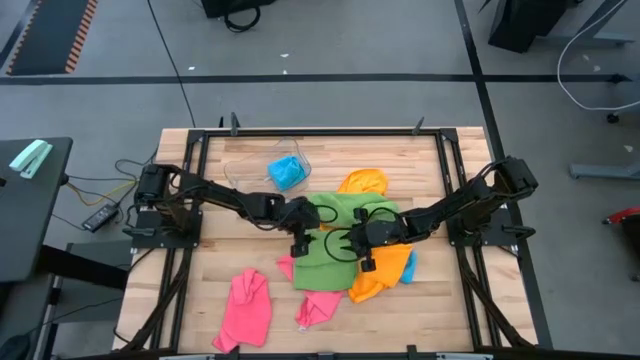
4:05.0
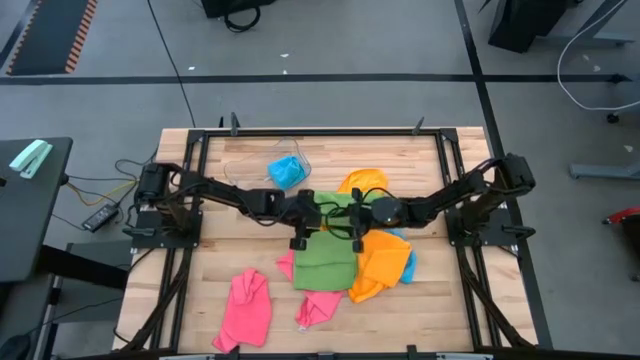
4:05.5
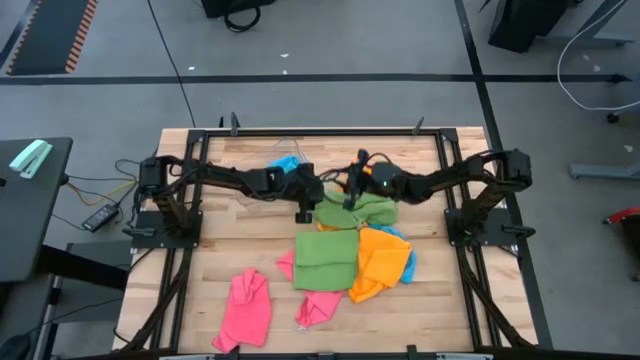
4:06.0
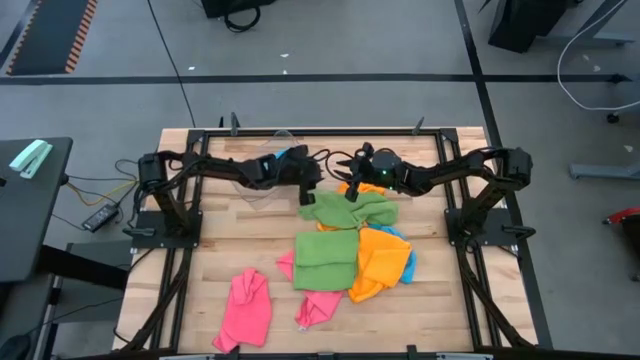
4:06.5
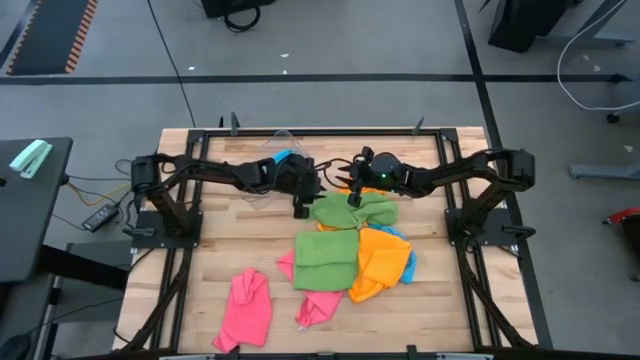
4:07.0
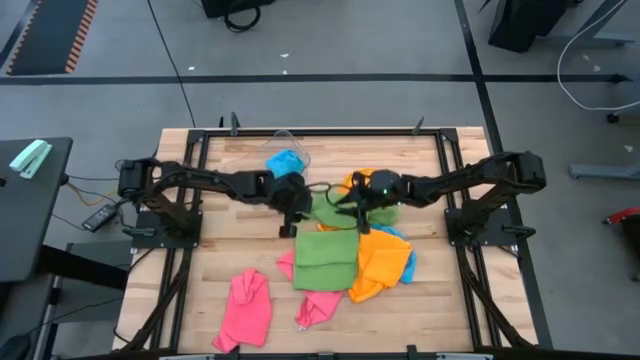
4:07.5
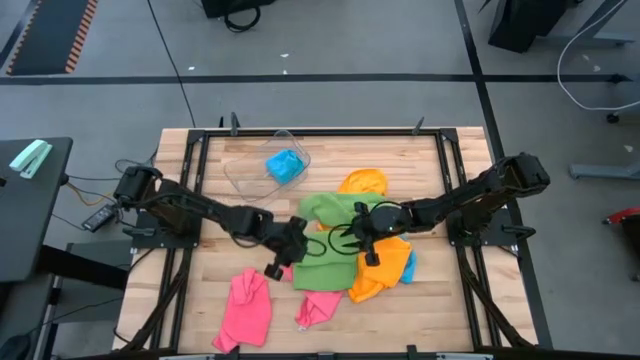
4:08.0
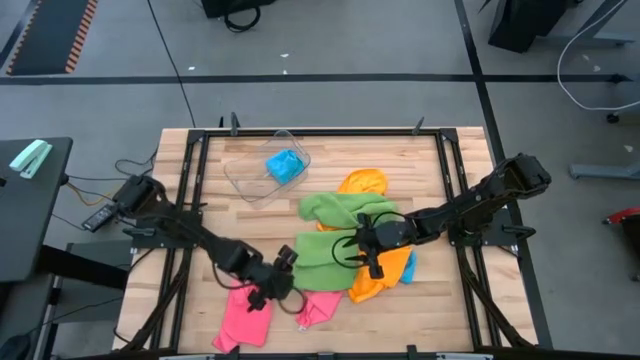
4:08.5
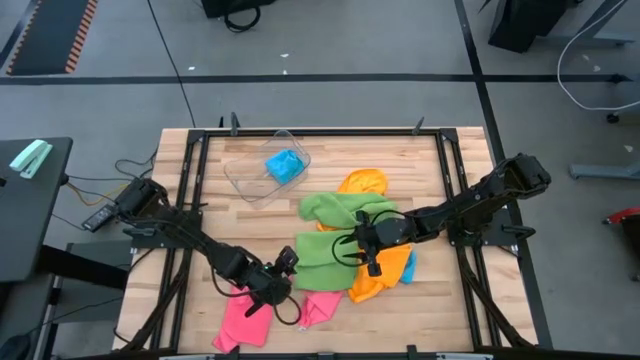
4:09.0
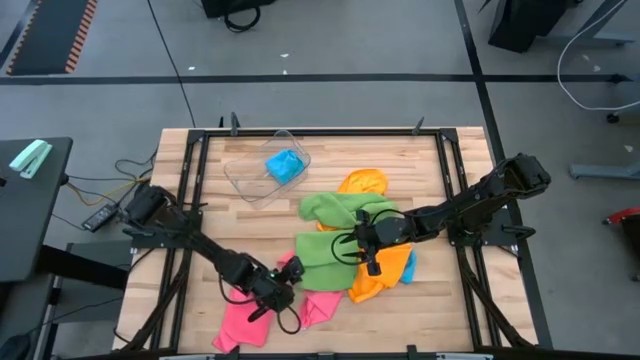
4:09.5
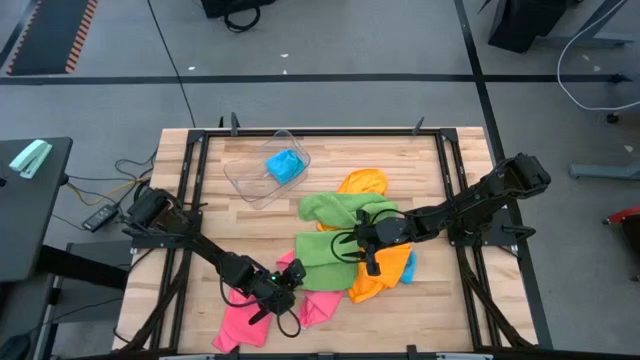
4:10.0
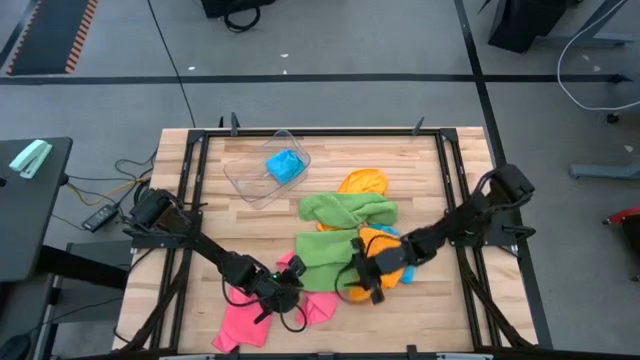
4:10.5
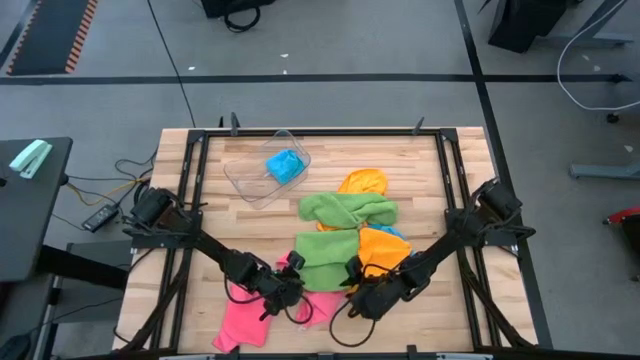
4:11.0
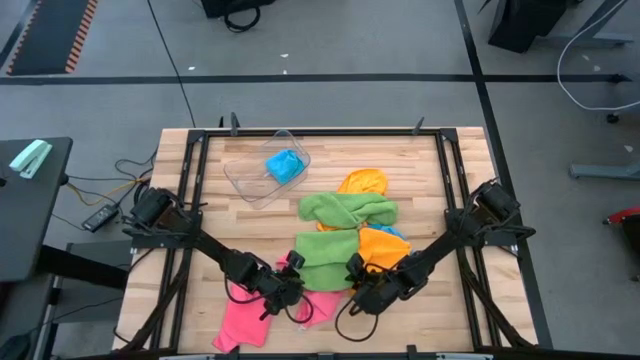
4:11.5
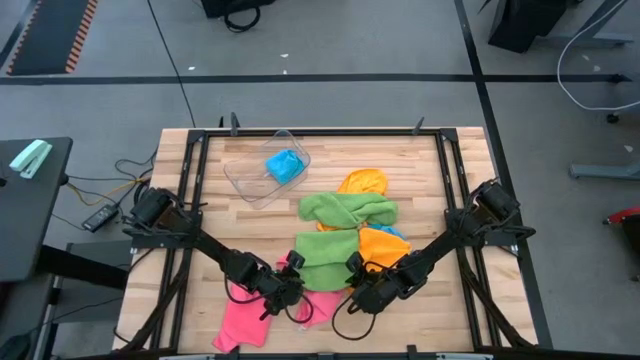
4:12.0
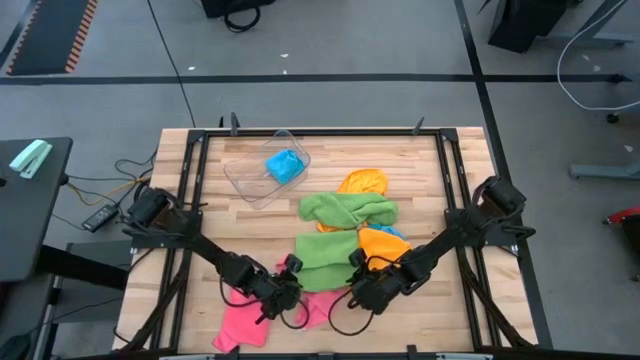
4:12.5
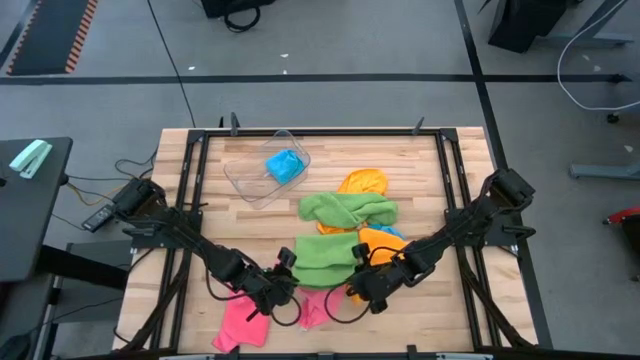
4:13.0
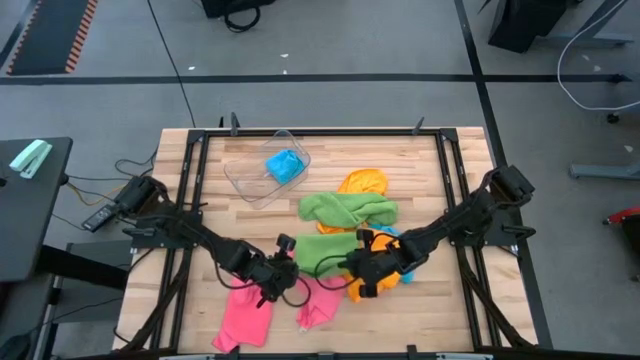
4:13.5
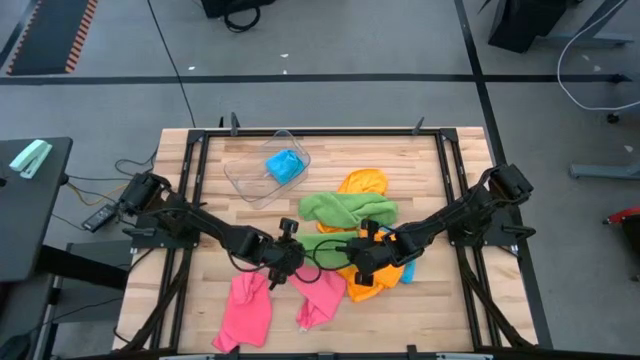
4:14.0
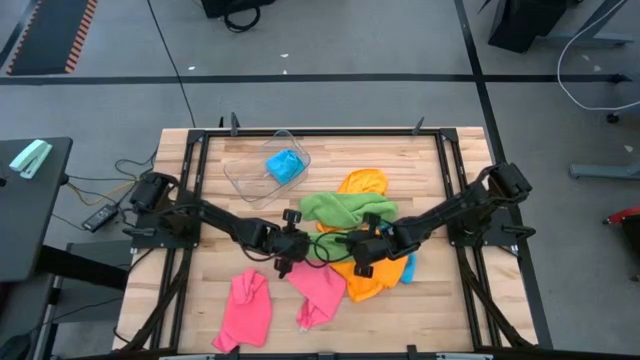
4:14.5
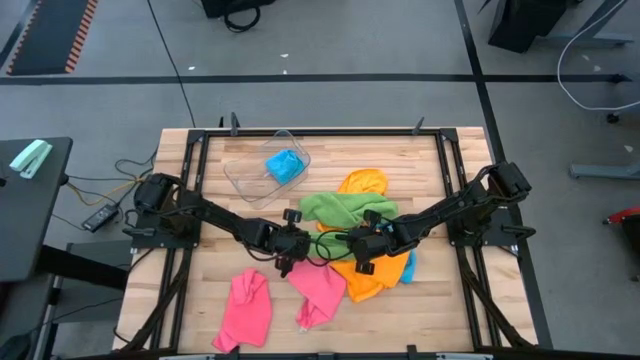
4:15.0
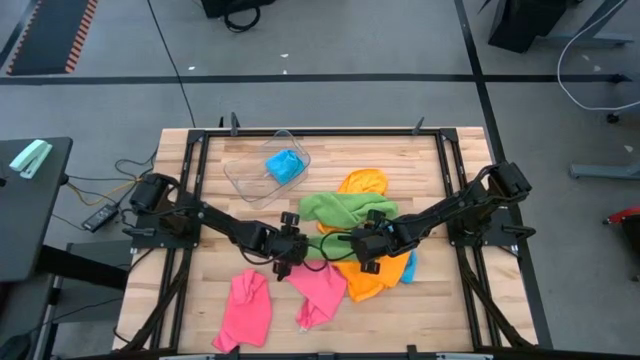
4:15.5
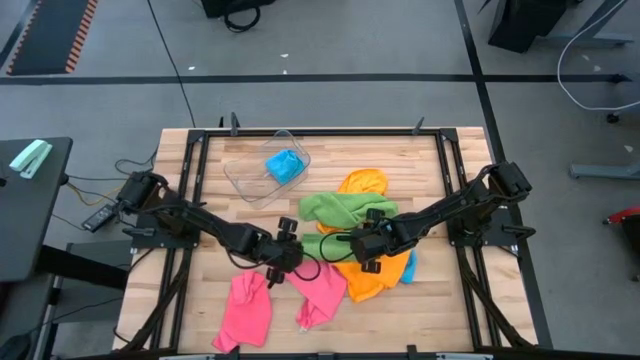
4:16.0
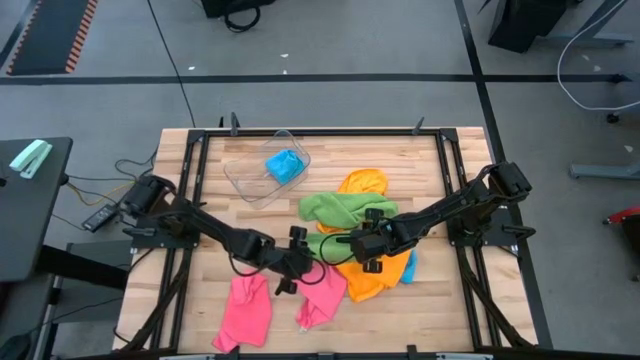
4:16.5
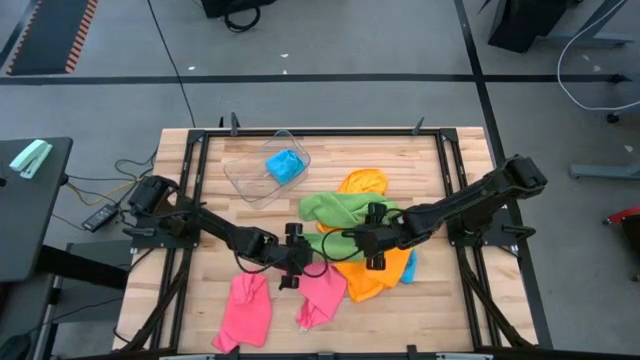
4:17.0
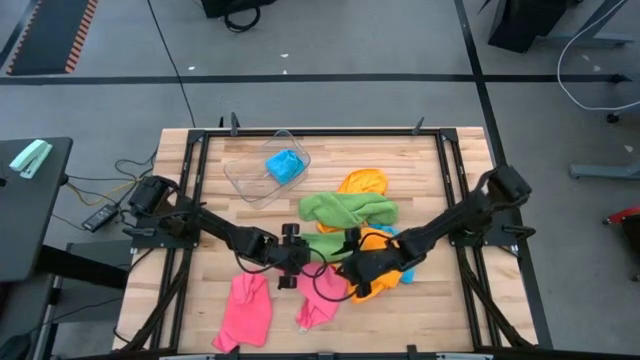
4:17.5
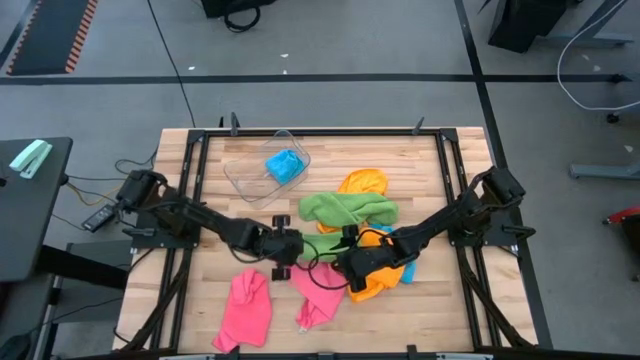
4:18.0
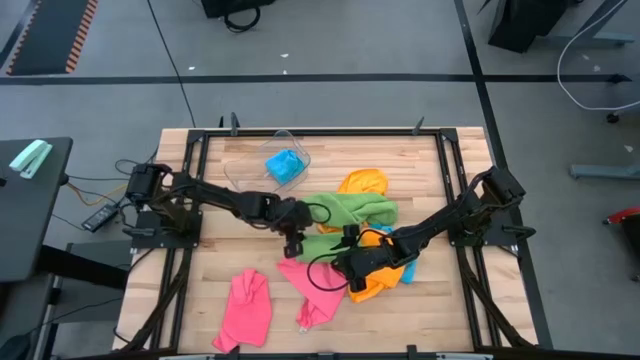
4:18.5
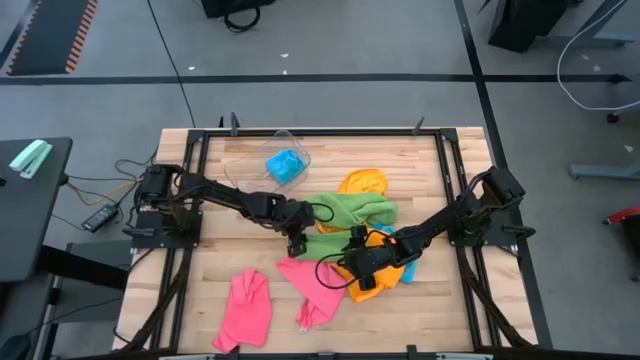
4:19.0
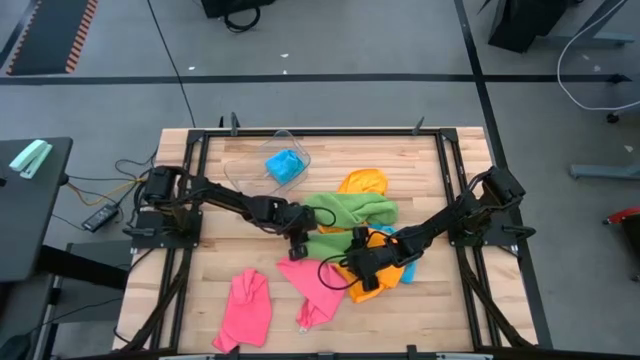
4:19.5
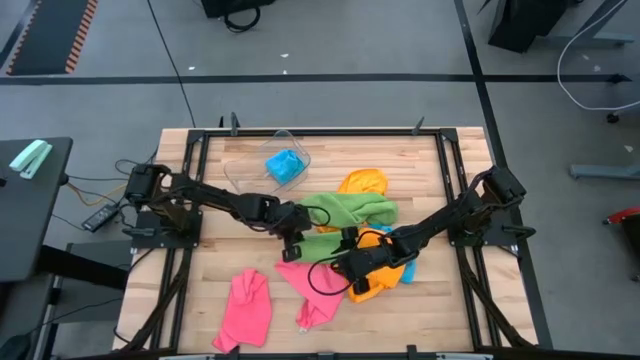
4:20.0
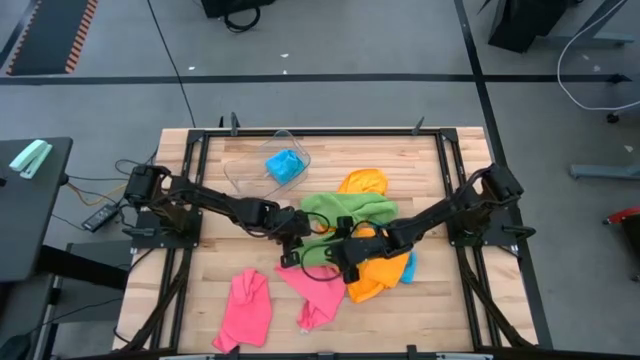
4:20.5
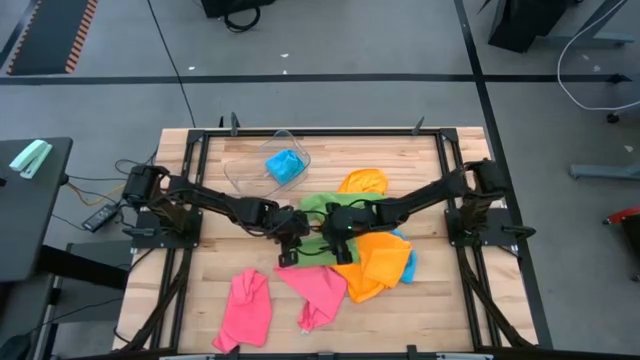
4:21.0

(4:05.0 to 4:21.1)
Task: Fold microfiber towels
Fold the left green microfiber towel

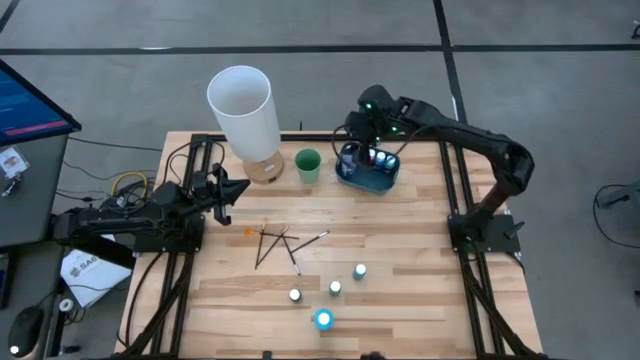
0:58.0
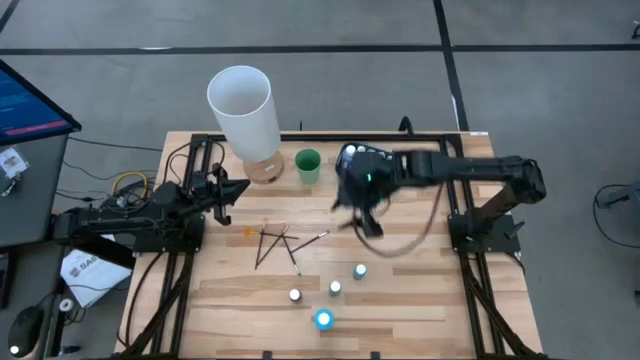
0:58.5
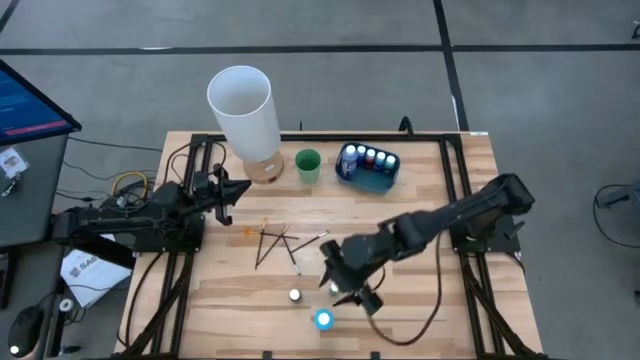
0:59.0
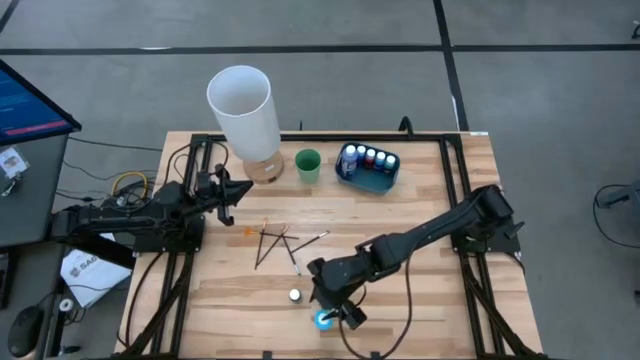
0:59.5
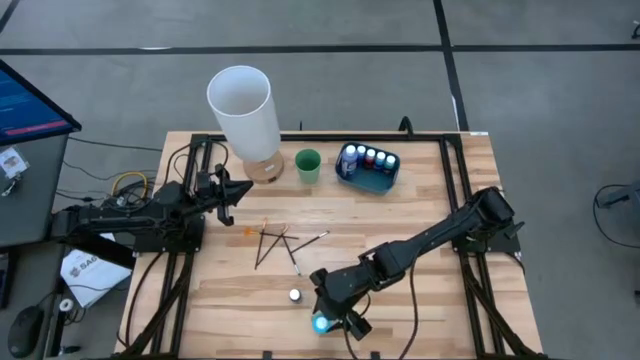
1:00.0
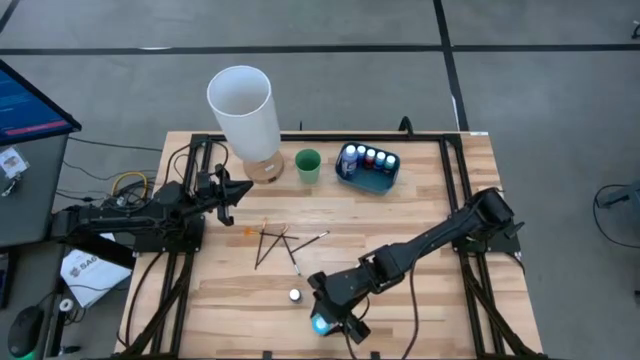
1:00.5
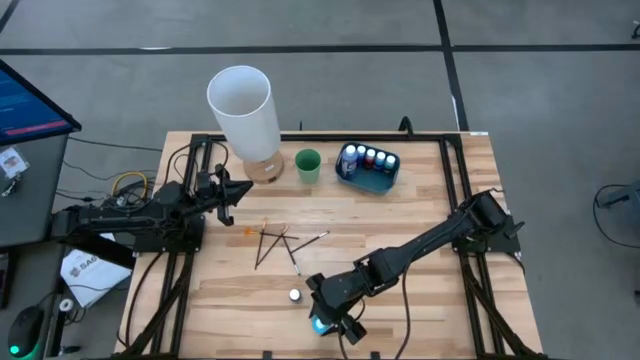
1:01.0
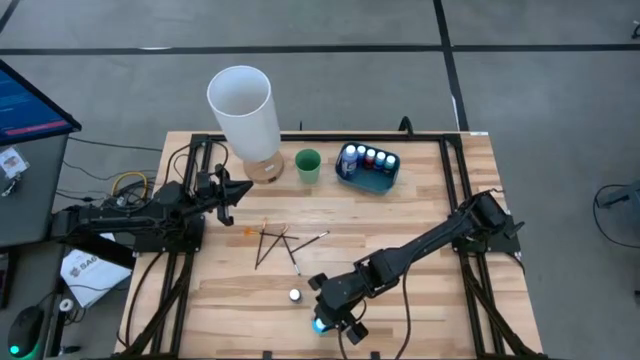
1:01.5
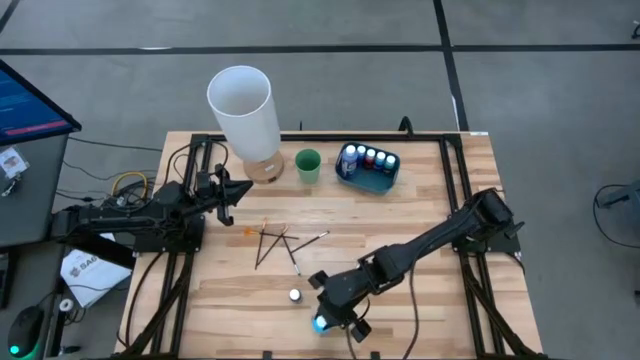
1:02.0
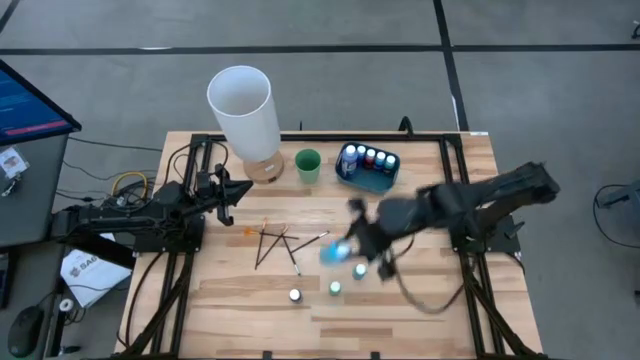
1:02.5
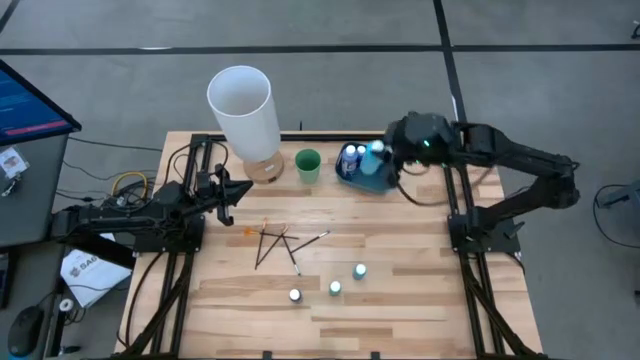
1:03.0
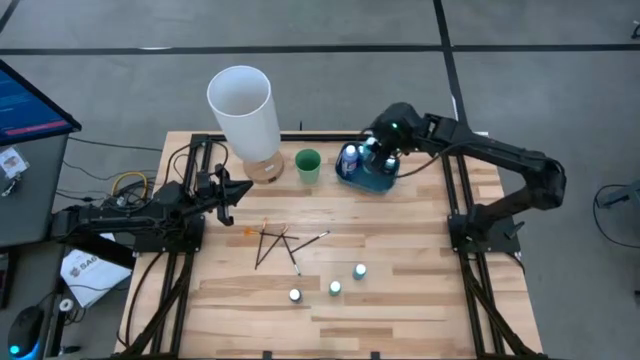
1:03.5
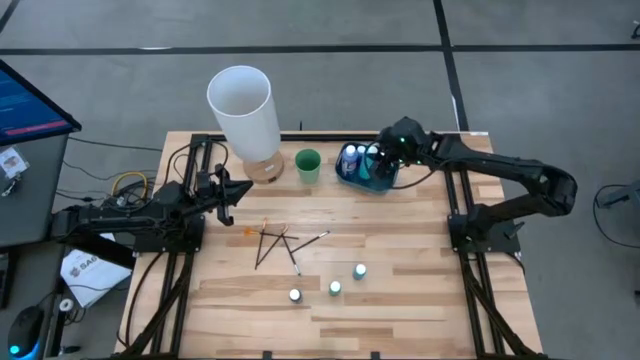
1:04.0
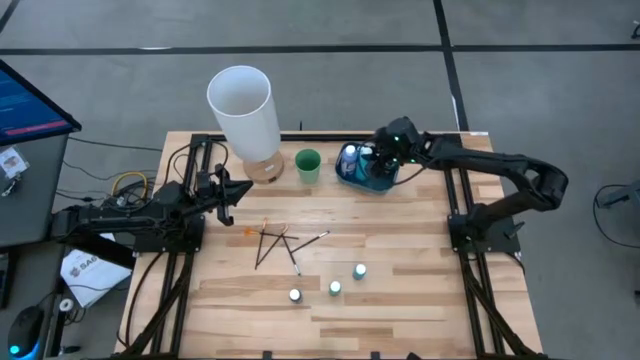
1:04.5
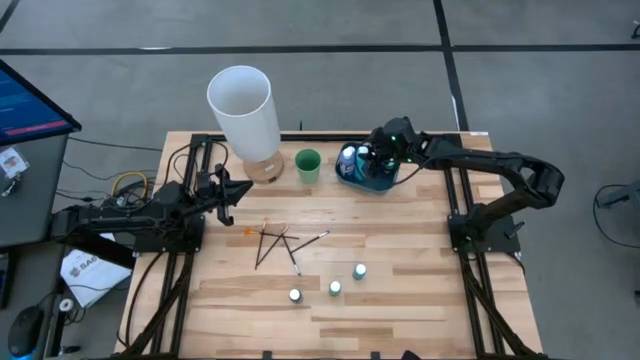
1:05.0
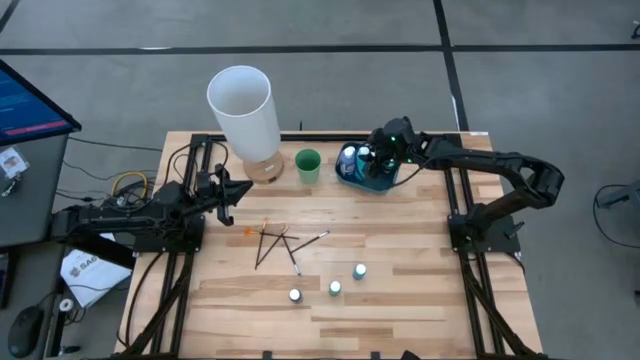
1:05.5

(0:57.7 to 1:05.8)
Task: Pick & Place Paint Supplies
Put the large light green paint bottle into the blue bin
